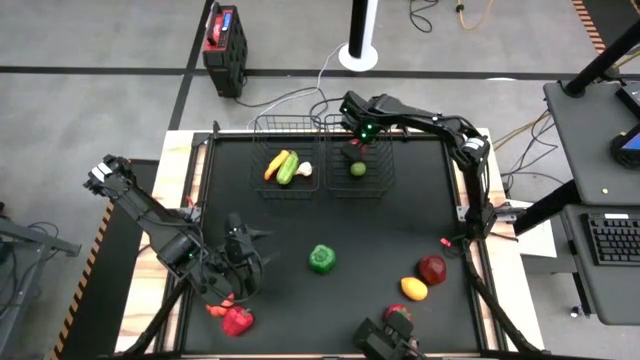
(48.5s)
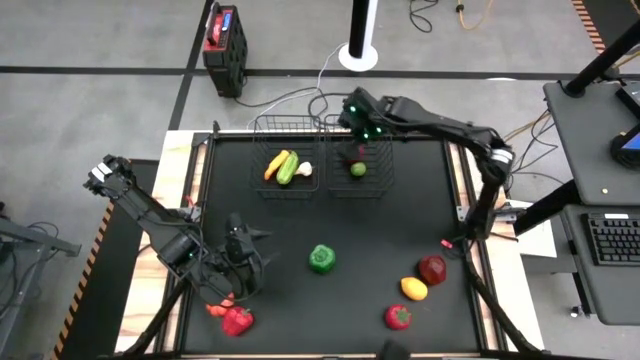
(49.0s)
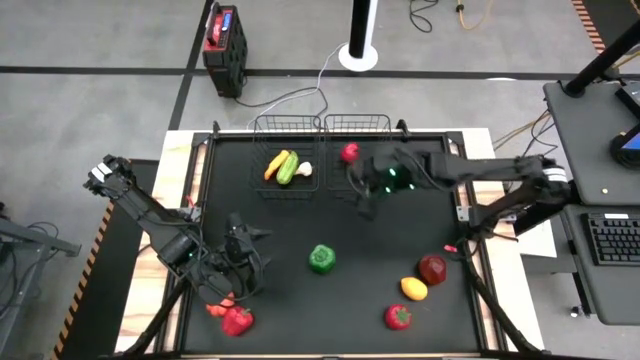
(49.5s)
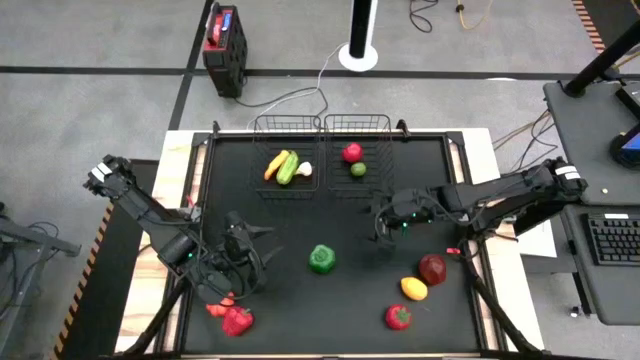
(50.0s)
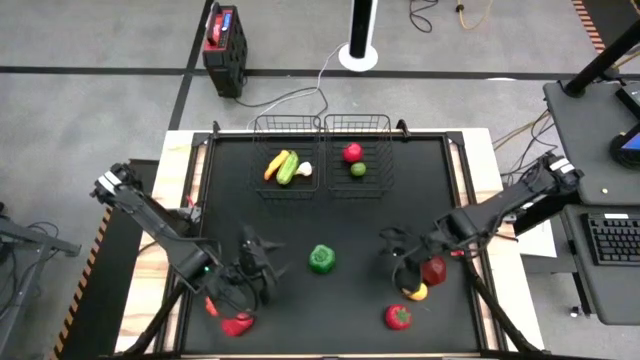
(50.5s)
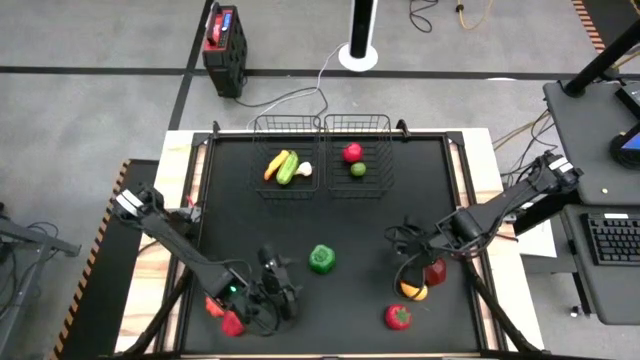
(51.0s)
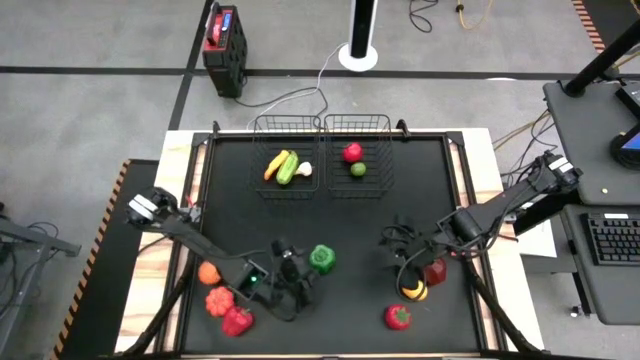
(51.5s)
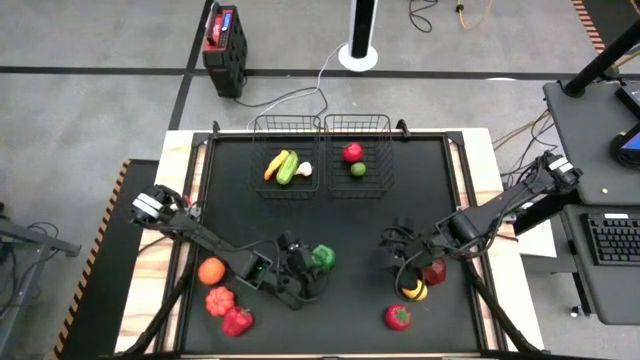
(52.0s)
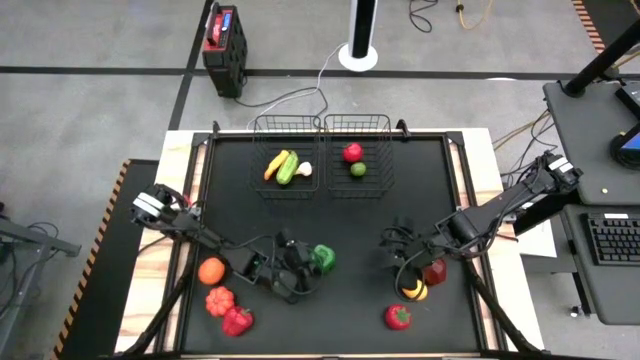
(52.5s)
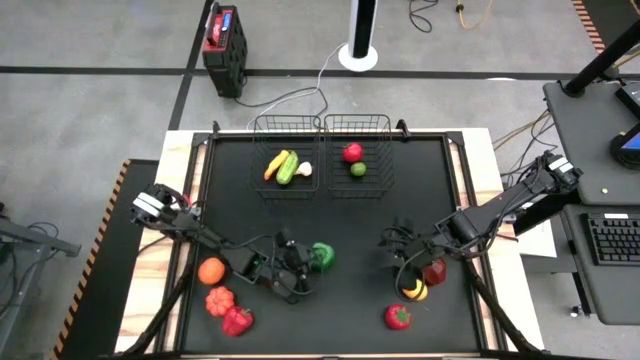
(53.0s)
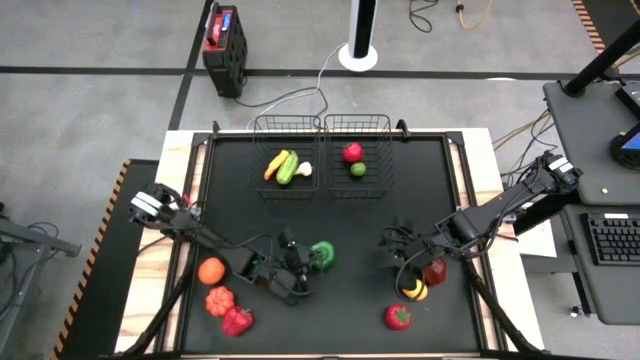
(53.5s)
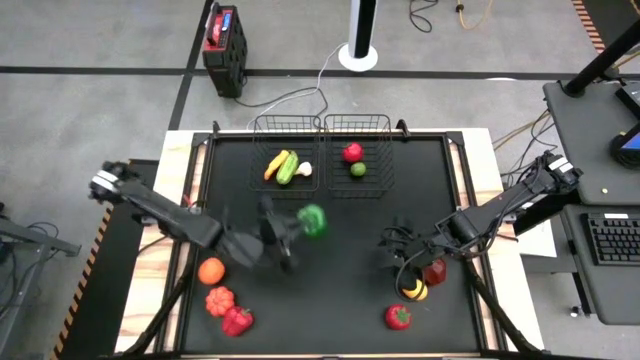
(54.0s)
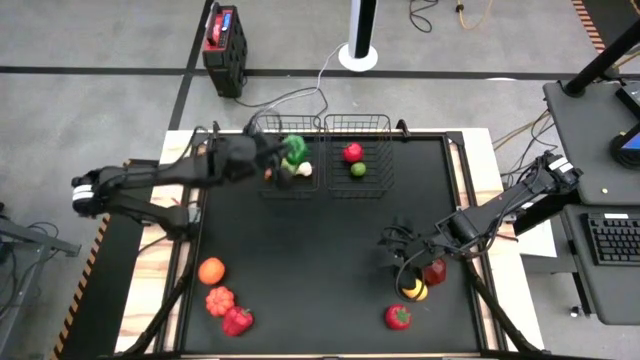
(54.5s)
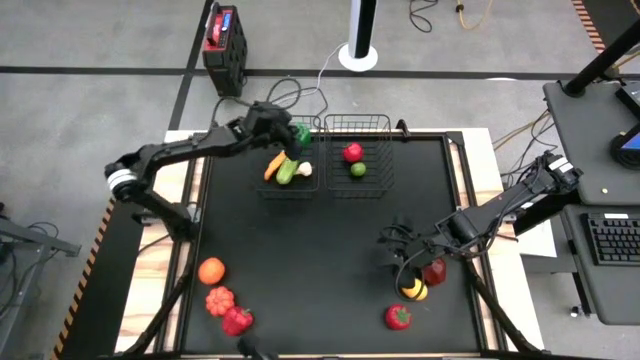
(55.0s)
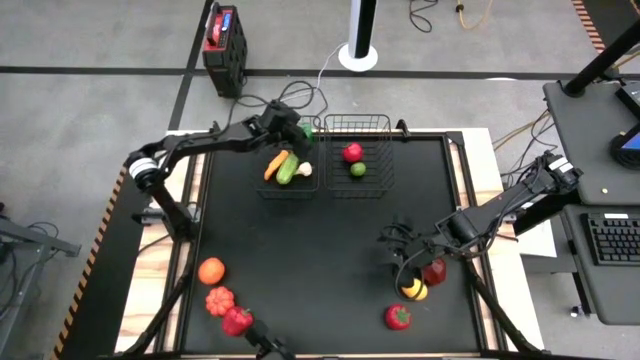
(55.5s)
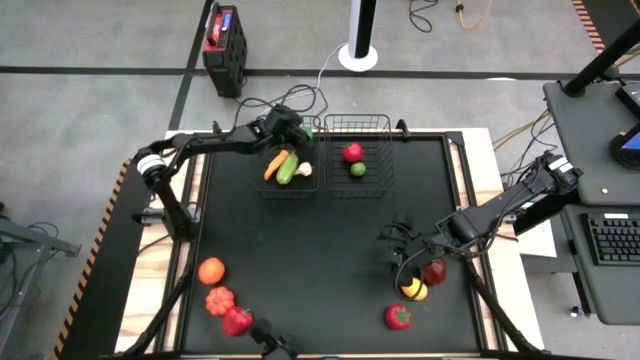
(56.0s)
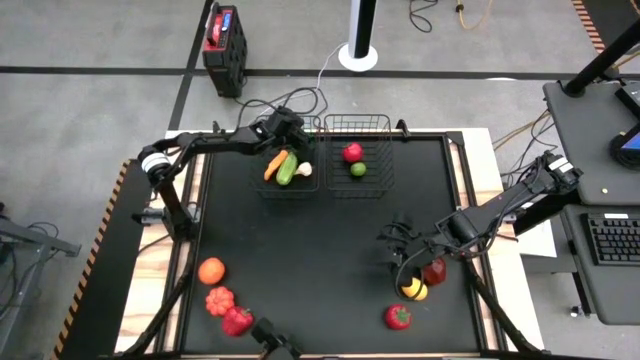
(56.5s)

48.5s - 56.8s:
Task: Sort produce into baskets
Put the green bell pepper into the left wire basket

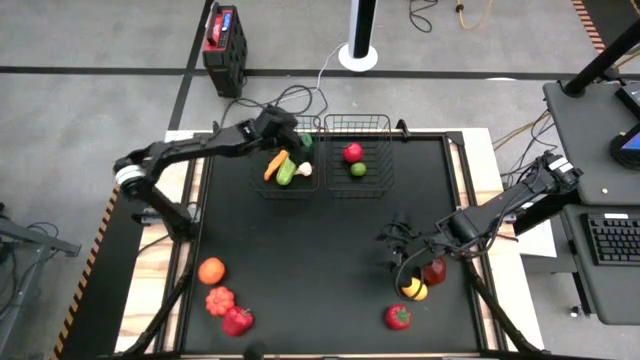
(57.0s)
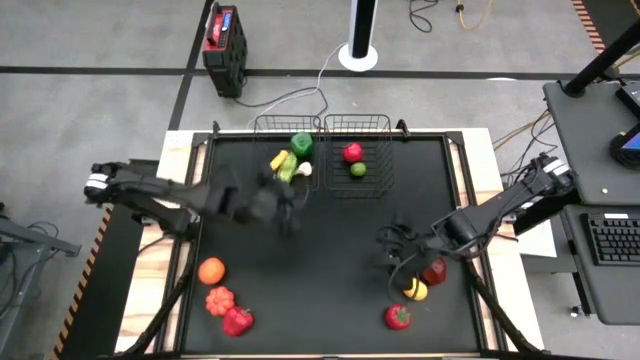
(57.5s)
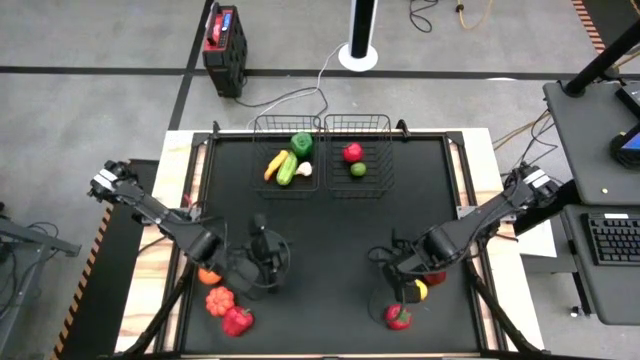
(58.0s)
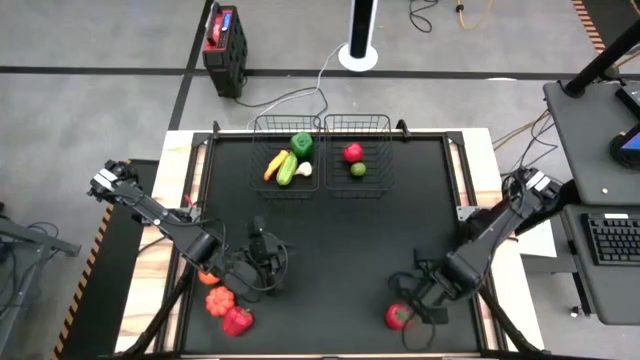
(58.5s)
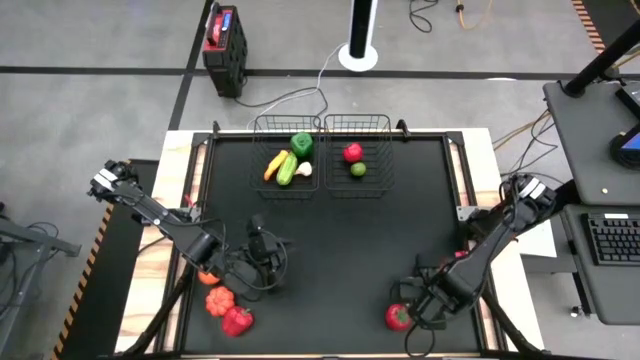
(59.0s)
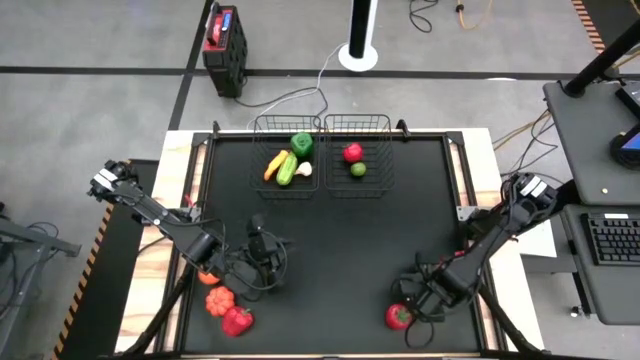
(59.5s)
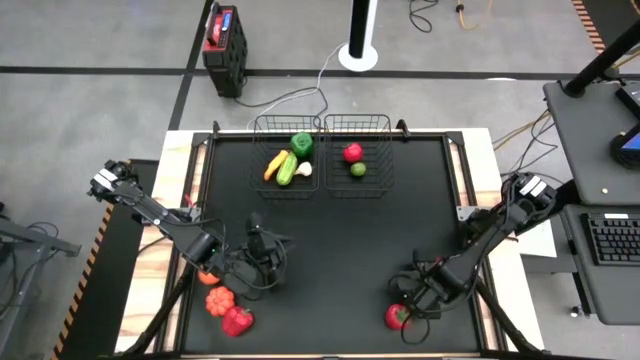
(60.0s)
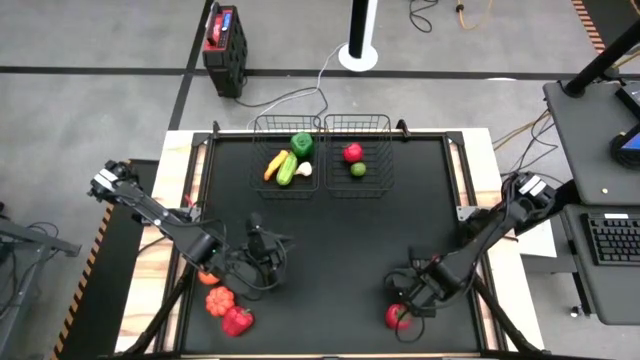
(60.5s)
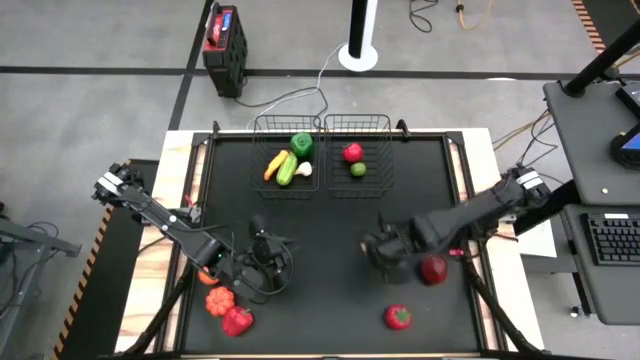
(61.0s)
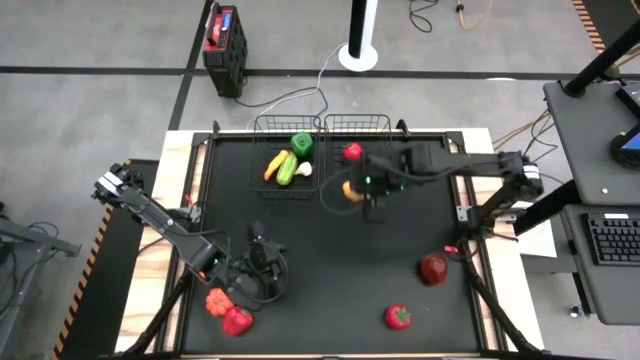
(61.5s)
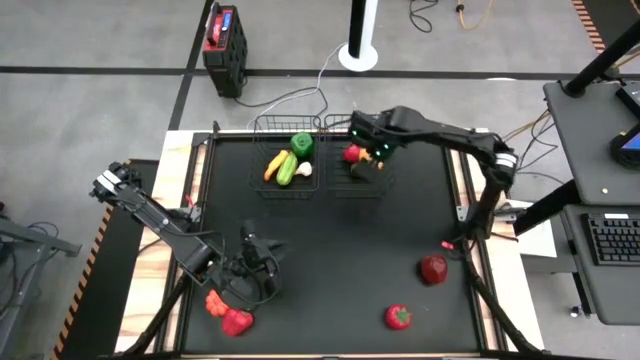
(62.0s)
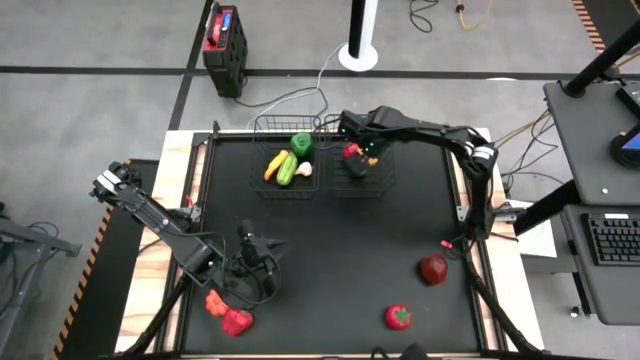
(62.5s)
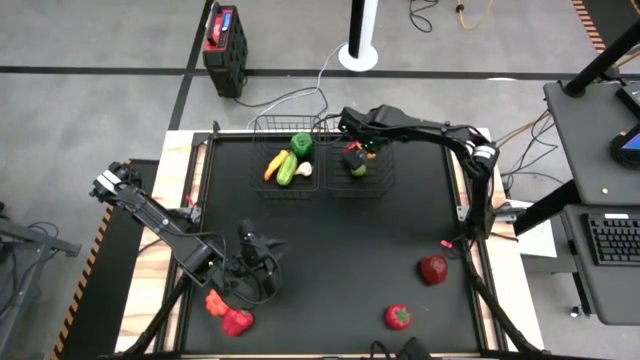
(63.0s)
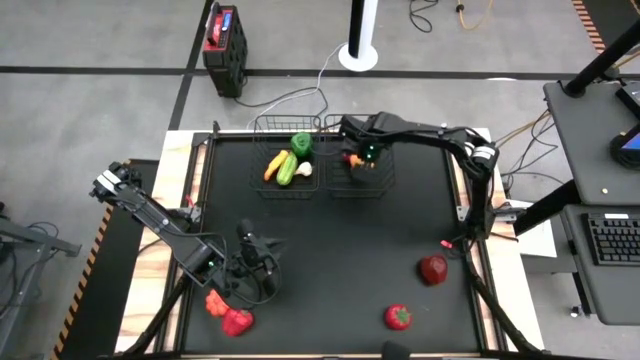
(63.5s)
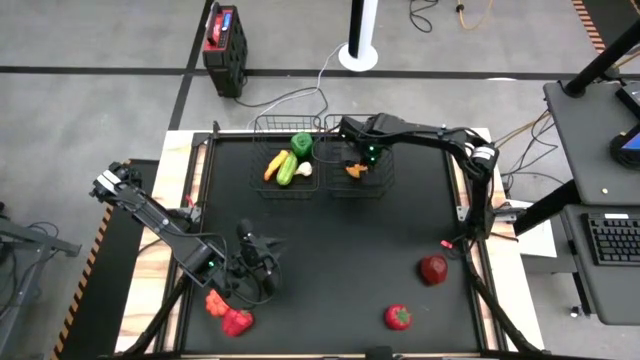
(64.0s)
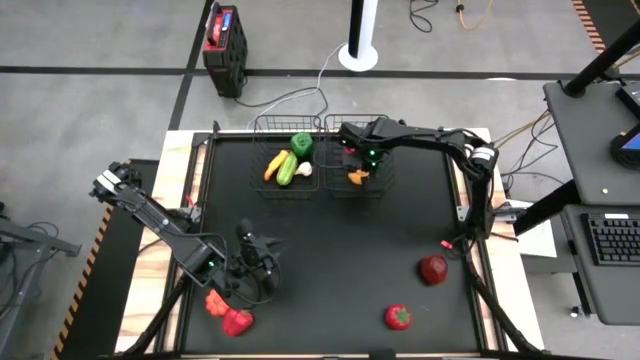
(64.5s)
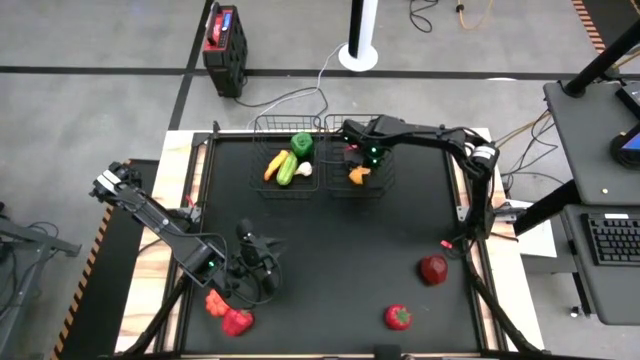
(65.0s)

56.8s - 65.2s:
Put the lemon into the right wire basket

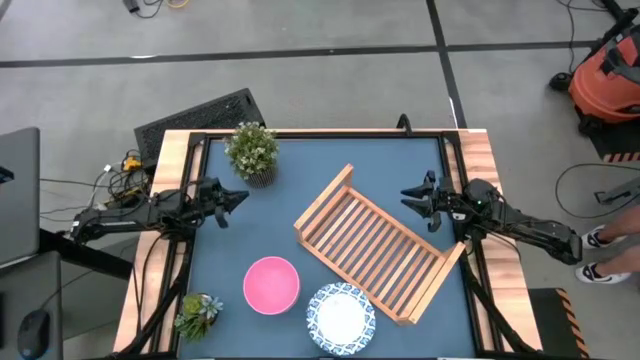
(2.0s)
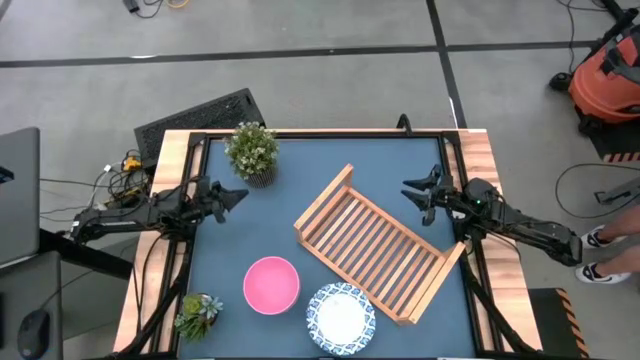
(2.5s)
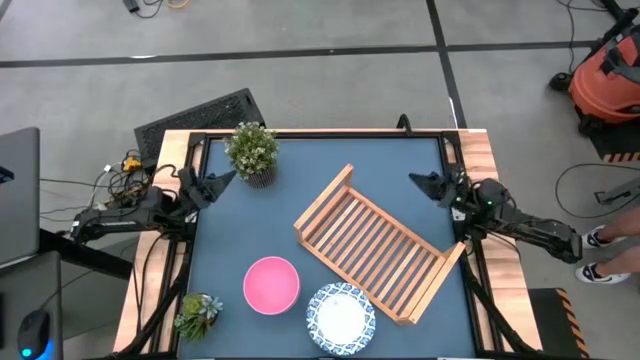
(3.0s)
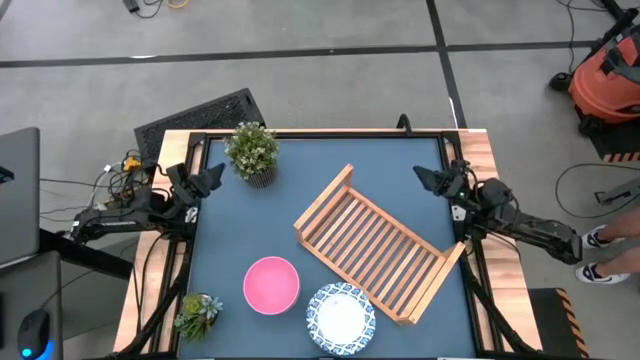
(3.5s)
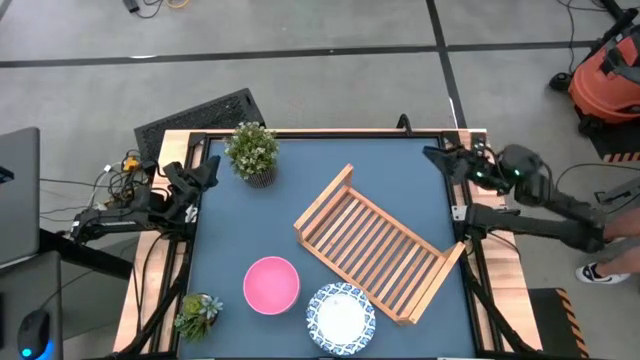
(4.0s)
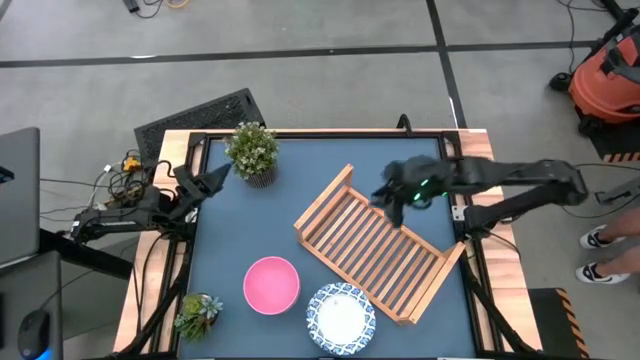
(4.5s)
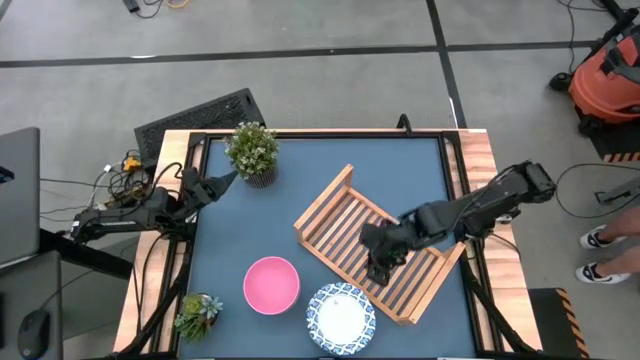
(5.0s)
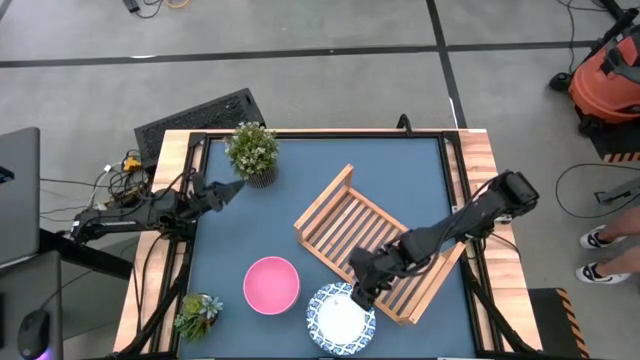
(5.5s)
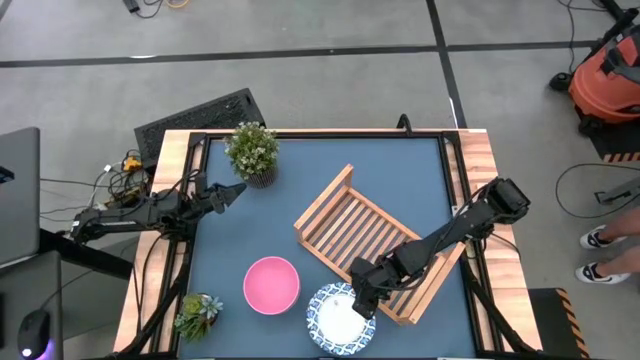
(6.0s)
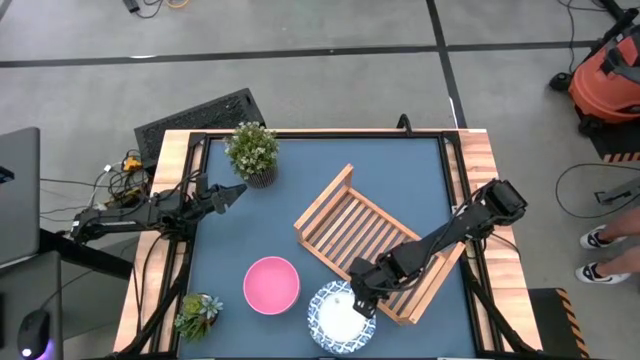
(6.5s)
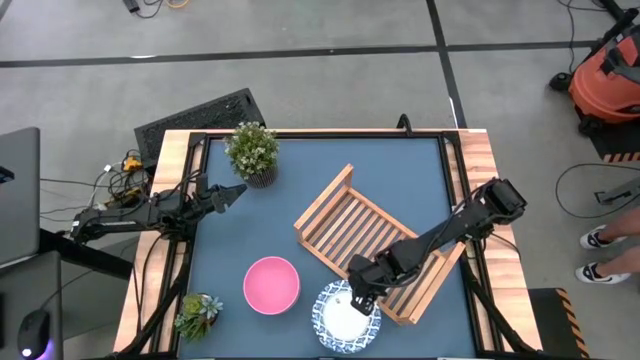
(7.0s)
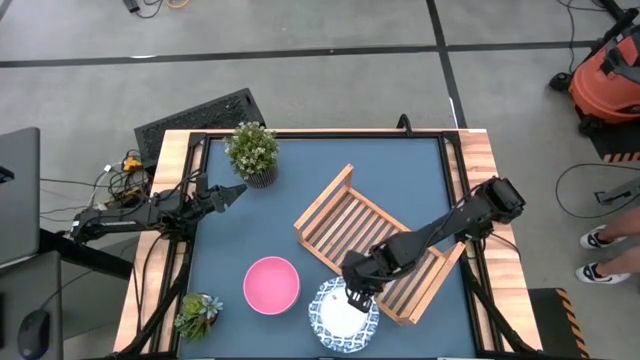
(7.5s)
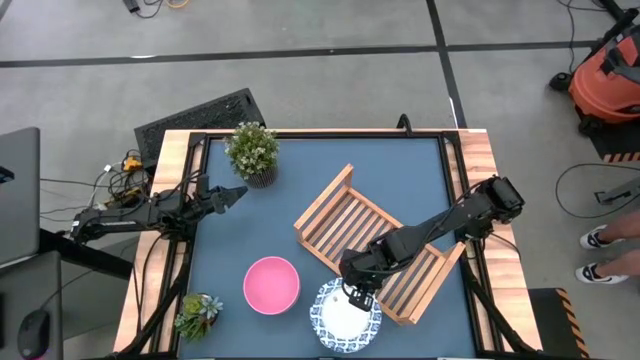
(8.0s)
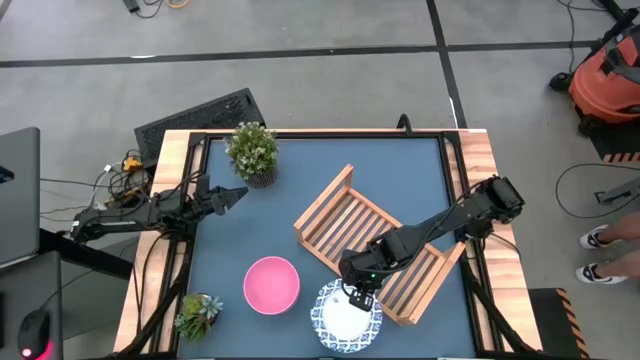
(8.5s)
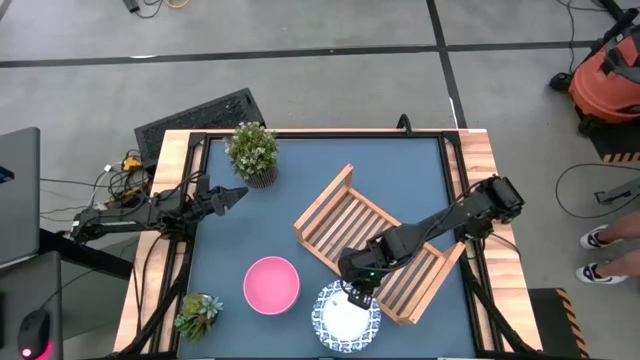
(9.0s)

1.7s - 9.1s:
Task: Place and stack bowls onto a shelf
Put the blue patterned bowl on the shelf
